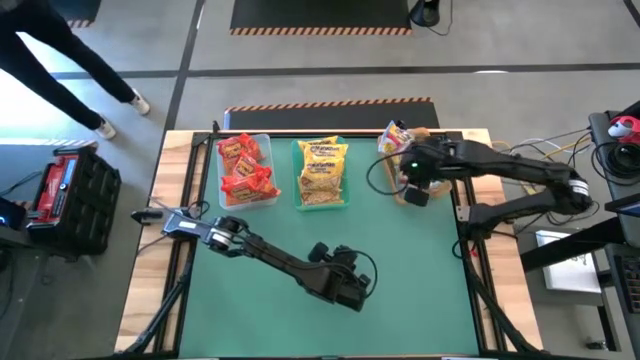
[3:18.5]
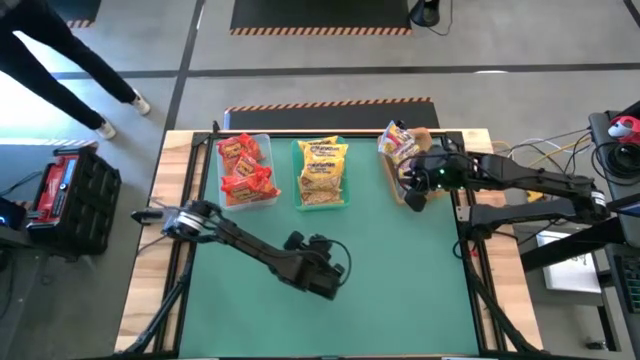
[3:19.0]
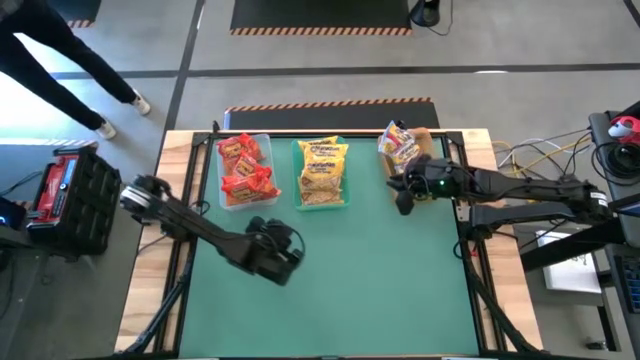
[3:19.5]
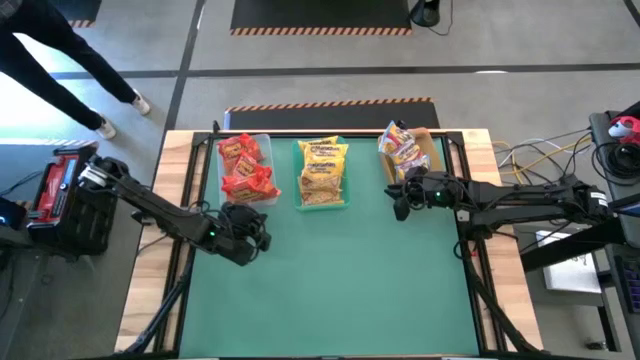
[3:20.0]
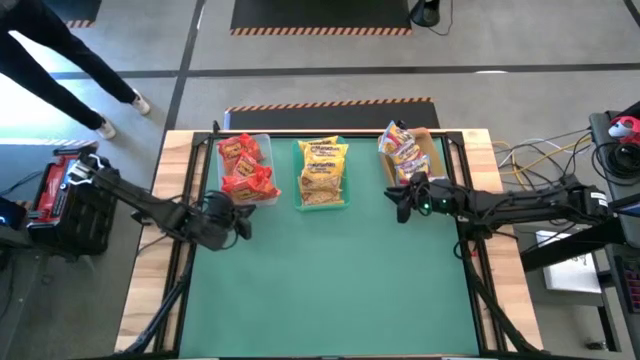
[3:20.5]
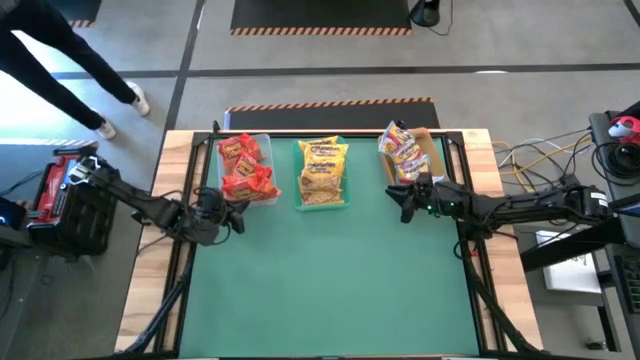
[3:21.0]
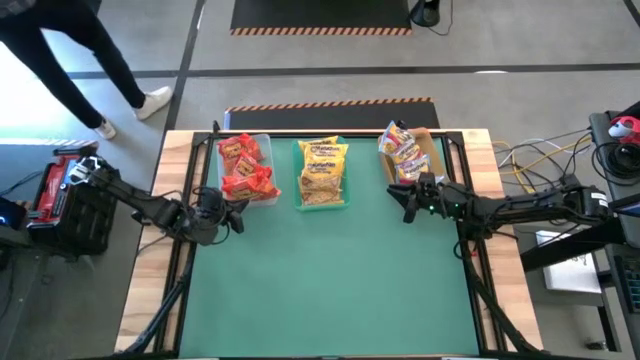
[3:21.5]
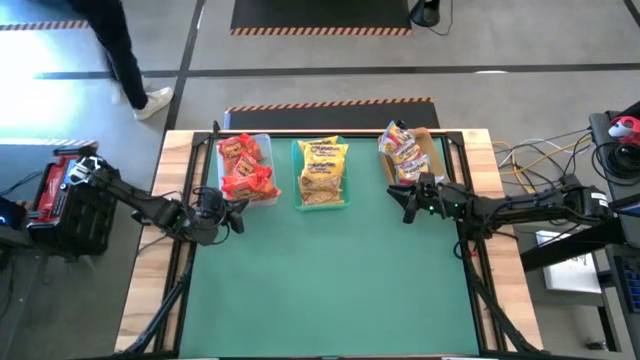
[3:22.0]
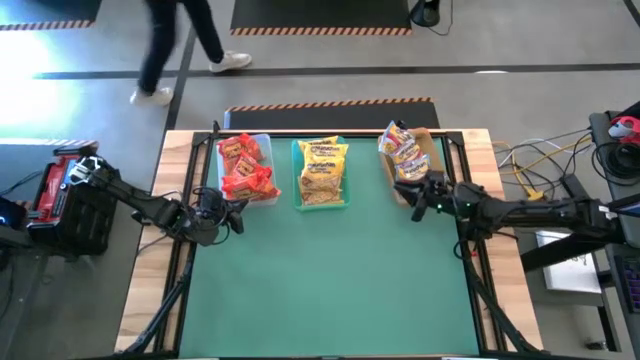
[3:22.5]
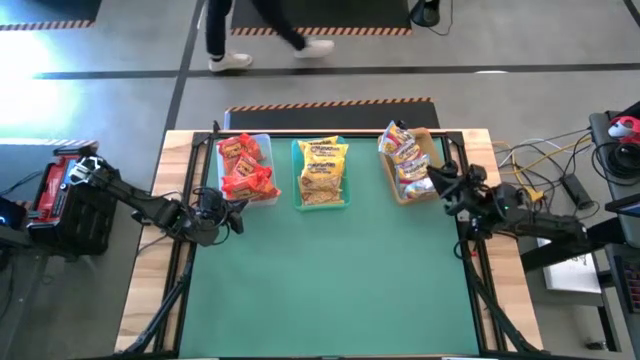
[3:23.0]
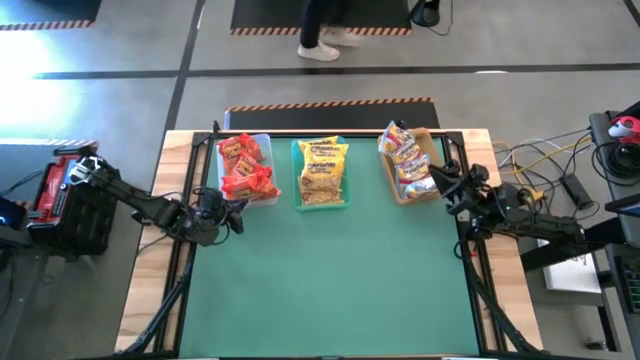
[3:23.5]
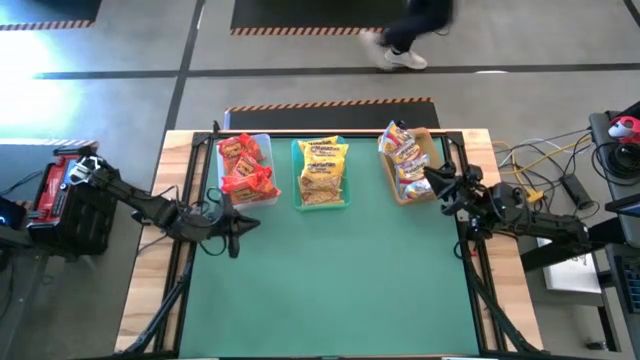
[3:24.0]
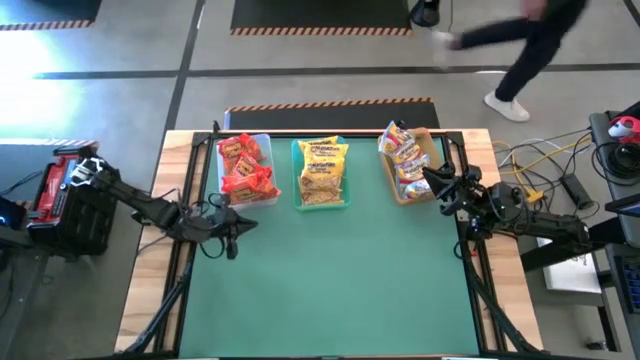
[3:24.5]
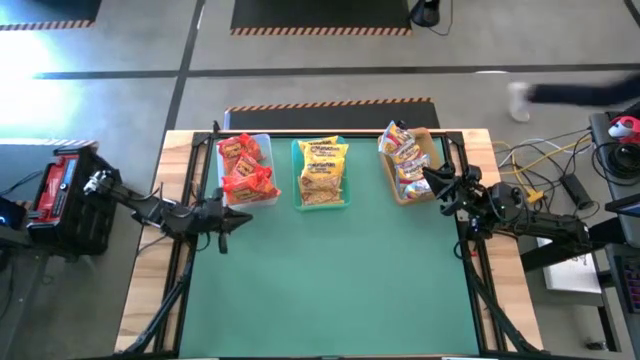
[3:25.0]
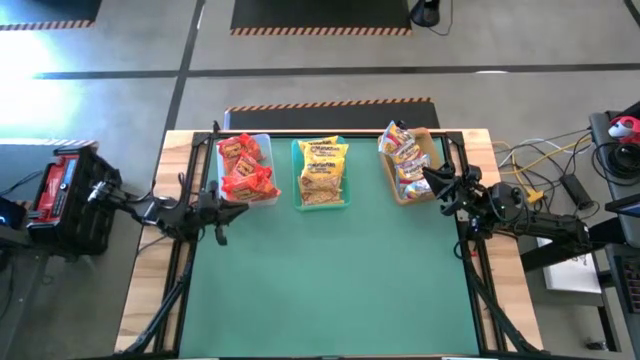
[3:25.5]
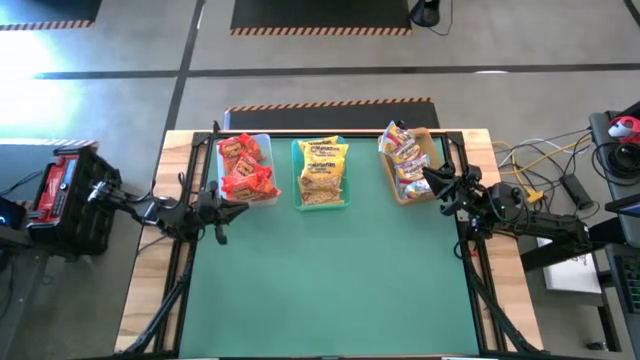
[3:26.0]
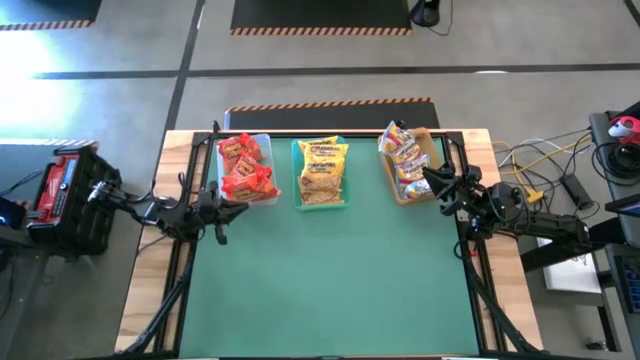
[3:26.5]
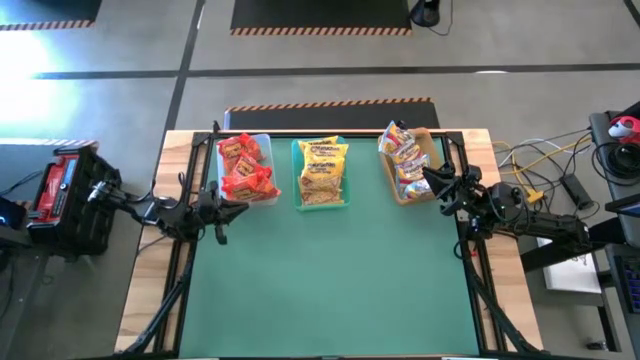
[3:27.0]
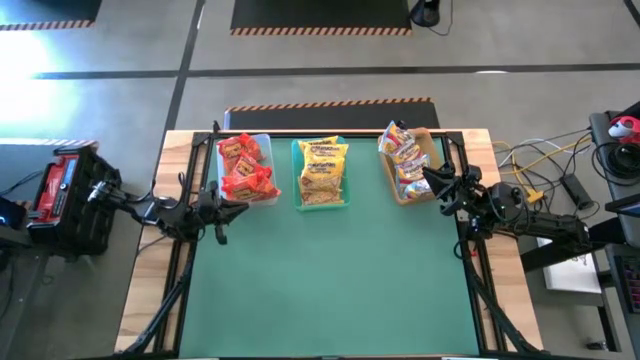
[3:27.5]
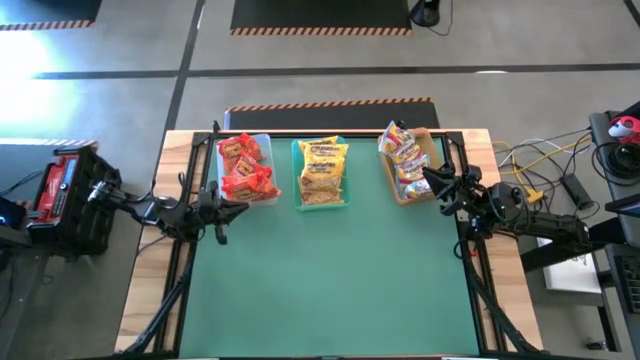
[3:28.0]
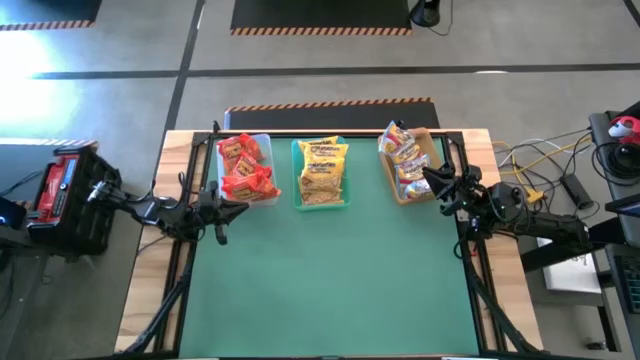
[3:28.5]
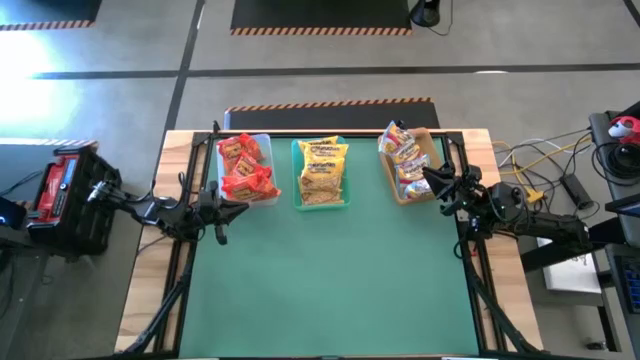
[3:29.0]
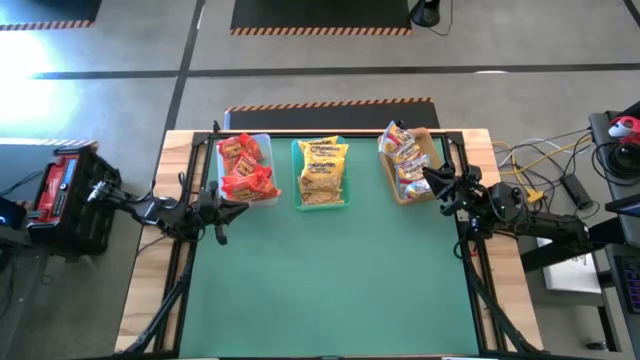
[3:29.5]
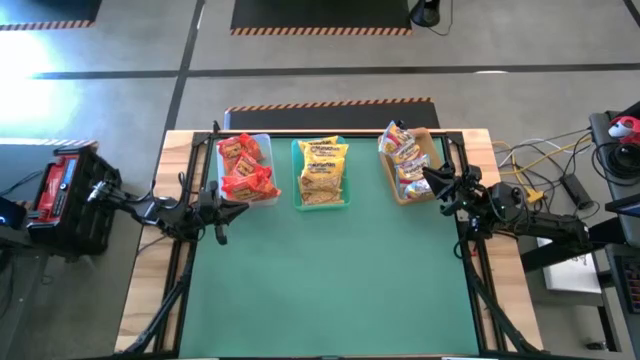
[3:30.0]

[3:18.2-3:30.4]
Task: Sort Maruchan noodles
Return to Home Position

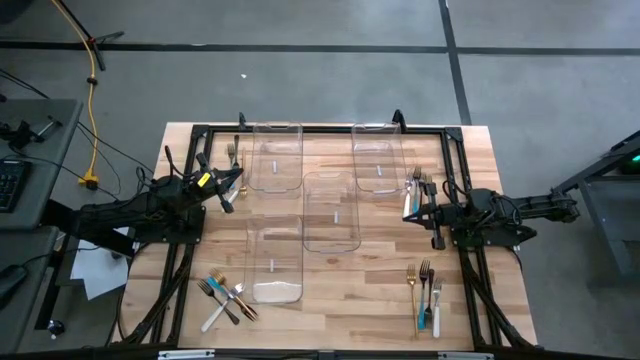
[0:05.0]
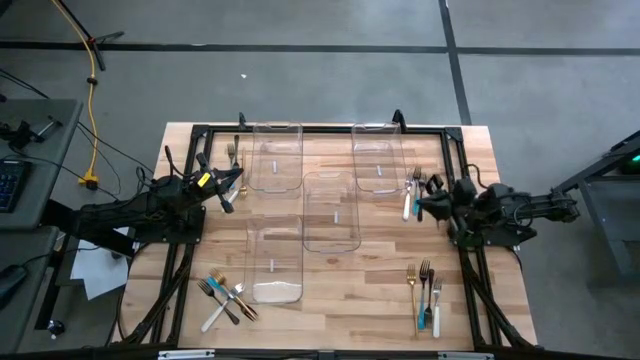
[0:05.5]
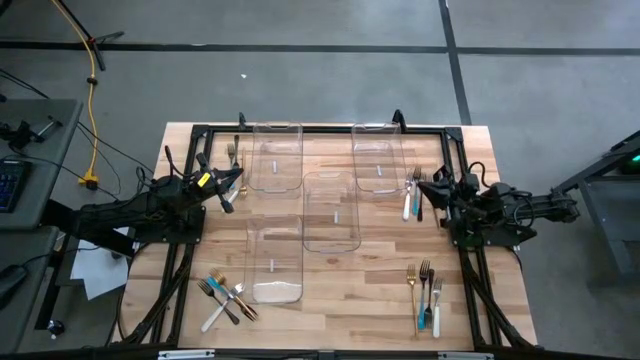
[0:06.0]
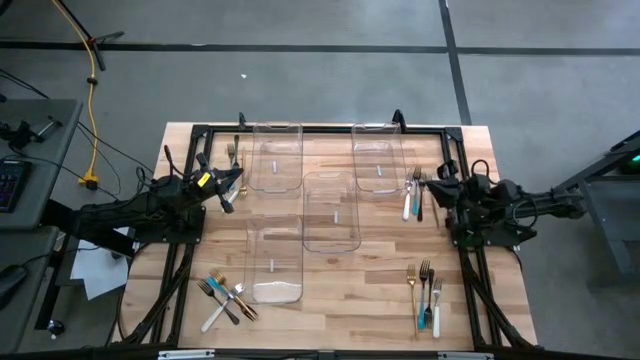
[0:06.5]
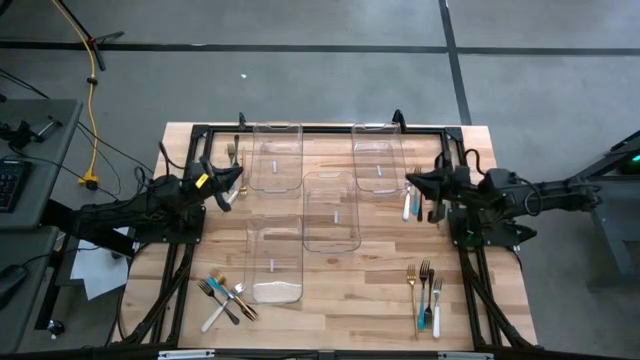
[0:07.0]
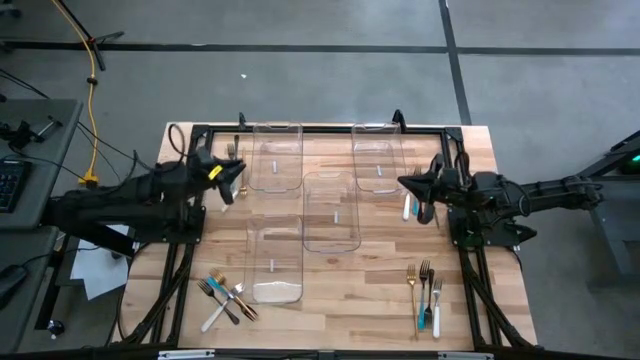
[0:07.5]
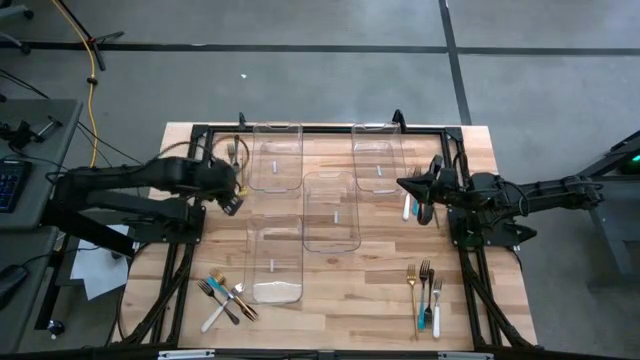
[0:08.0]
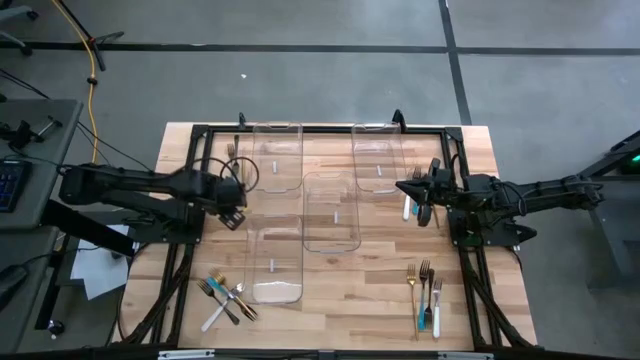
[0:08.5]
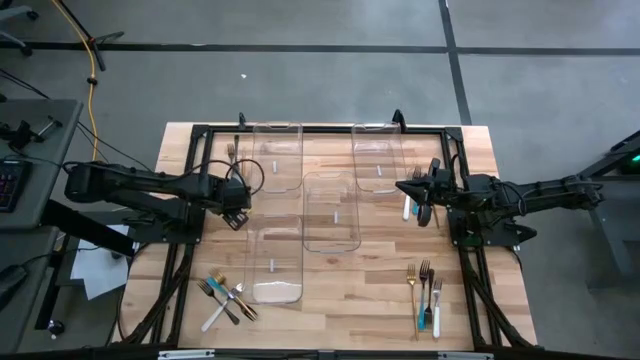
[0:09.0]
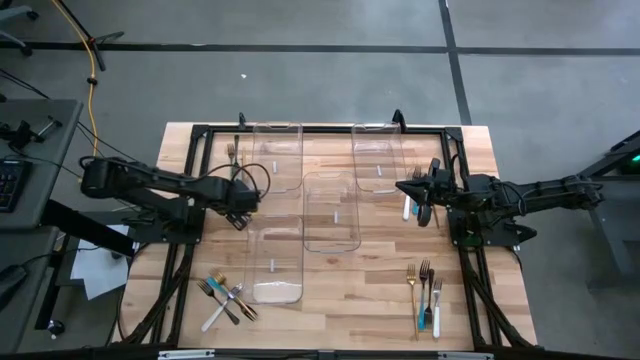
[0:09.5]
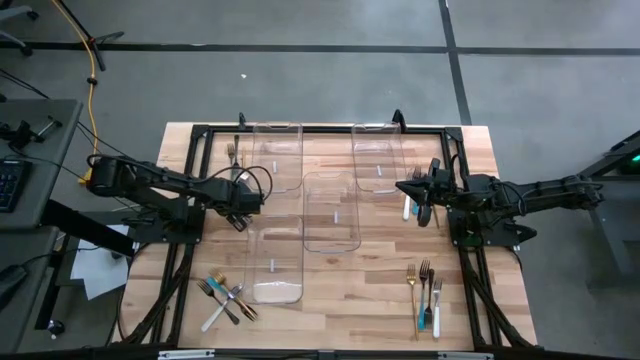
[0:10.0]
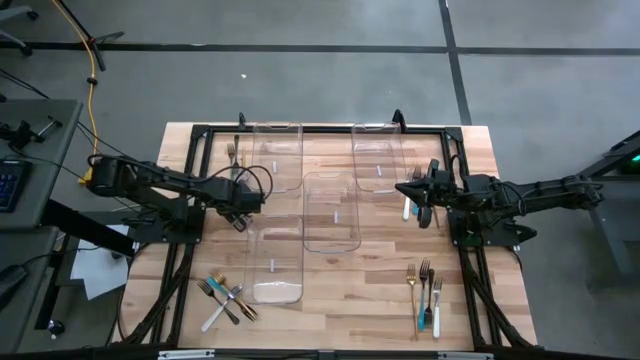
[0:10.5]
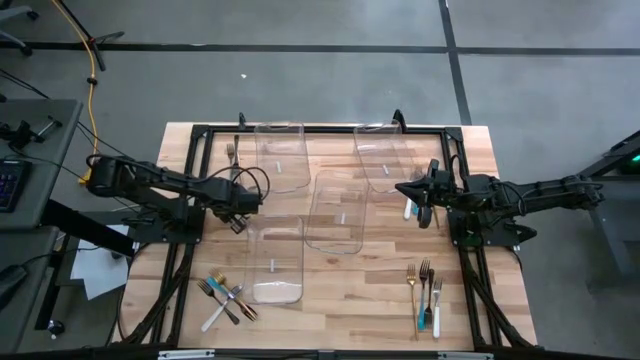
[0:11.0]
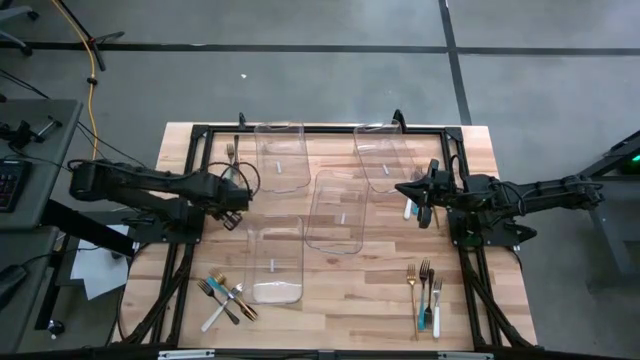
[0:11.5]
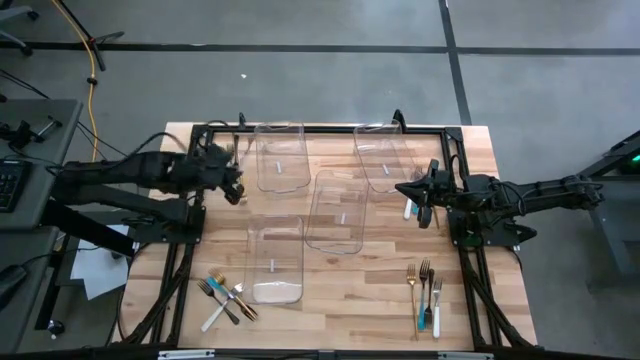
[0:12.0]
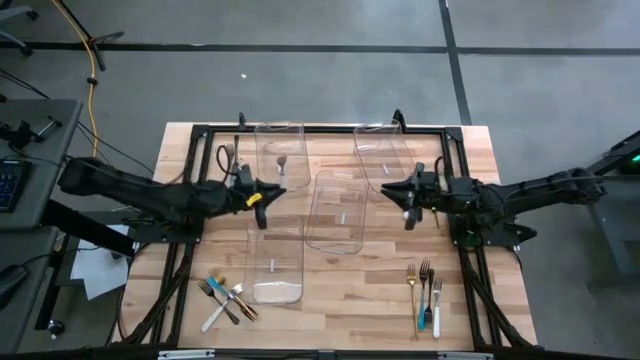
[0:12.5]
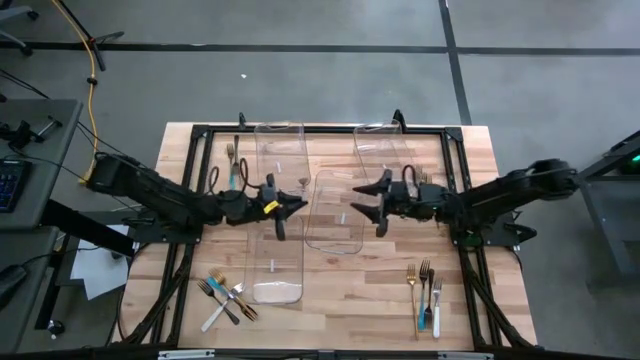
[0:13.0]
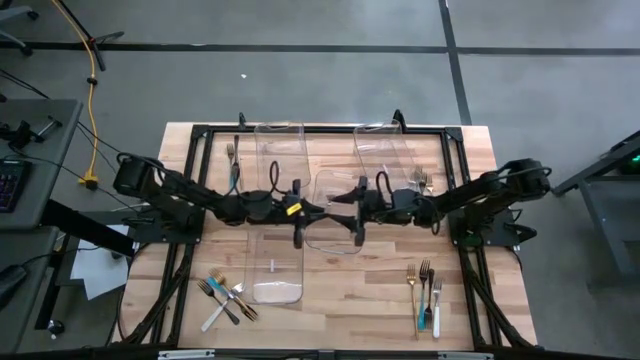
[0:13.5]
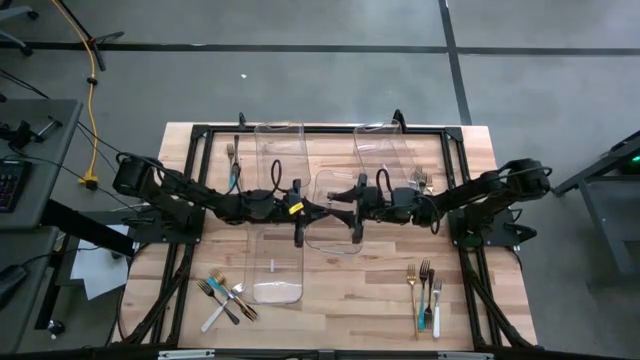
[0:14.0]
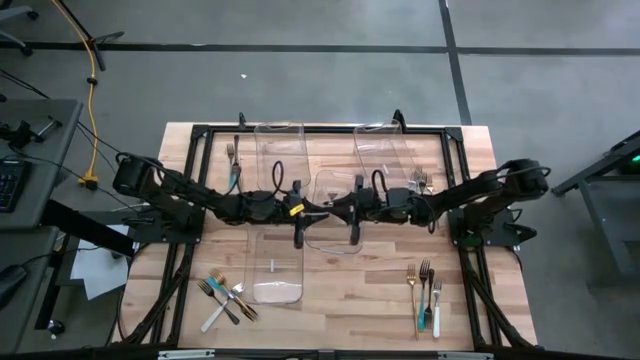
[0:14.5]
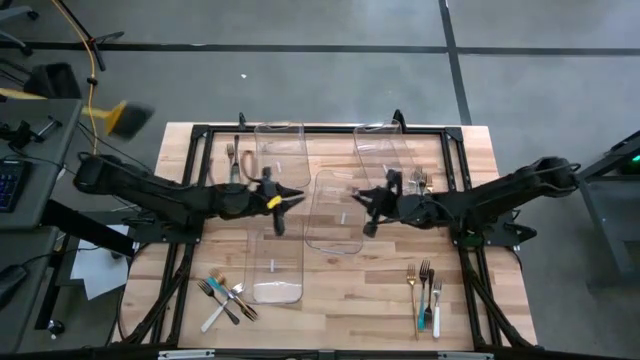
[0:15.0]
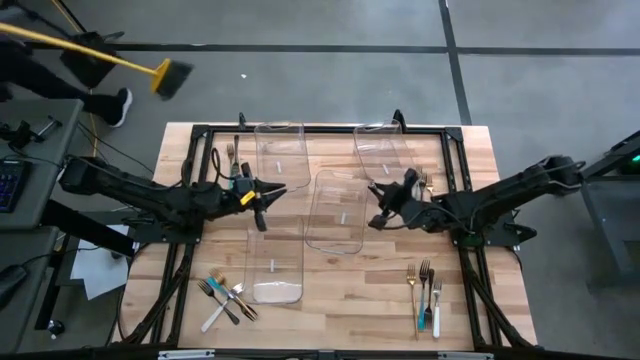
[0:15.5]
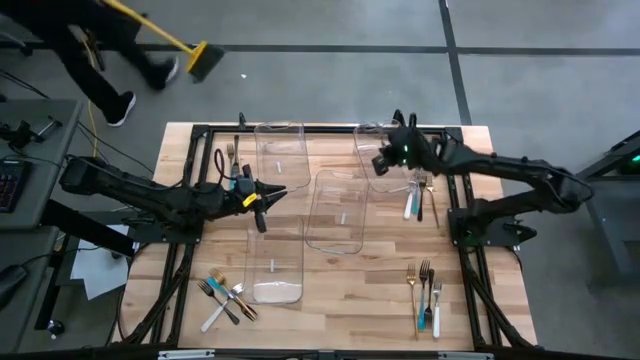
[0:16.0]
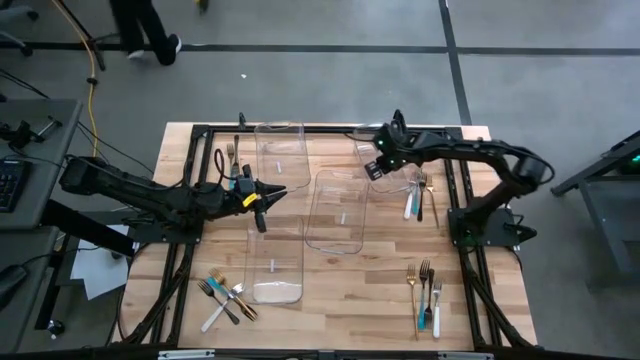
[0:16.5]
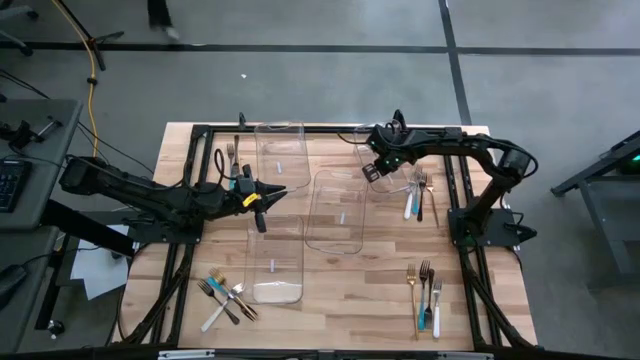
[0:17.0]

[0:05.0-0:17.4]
Task: Sort silverware by color (type)
Put the white fork into the top right transparent bin
